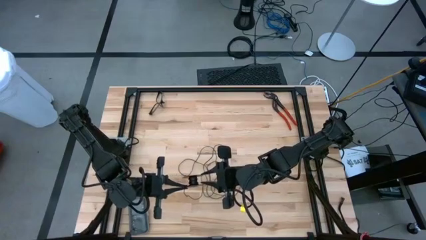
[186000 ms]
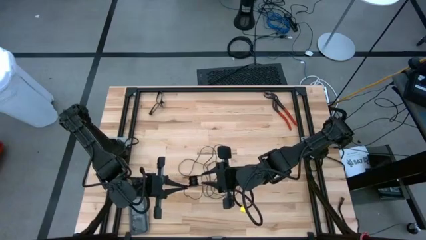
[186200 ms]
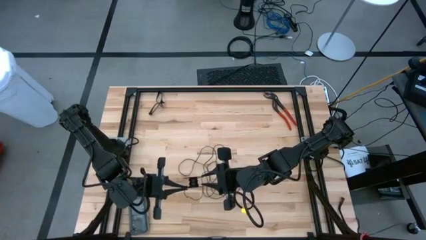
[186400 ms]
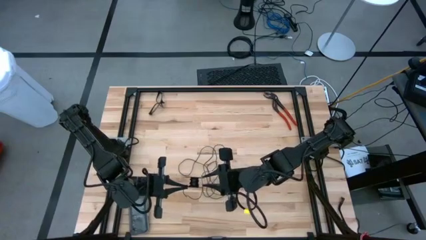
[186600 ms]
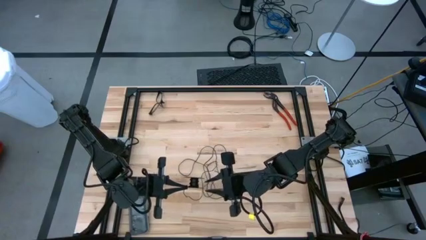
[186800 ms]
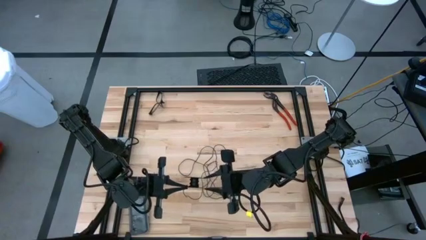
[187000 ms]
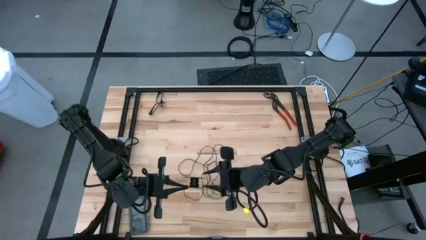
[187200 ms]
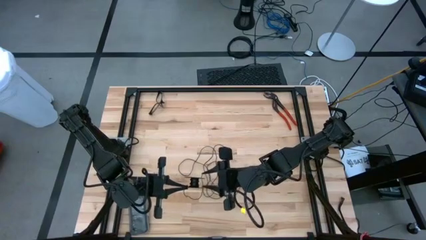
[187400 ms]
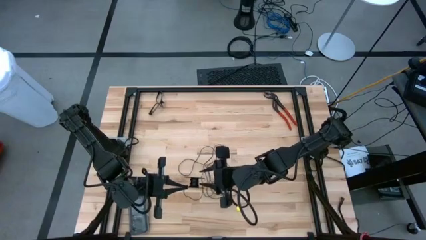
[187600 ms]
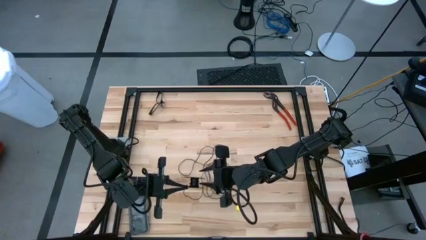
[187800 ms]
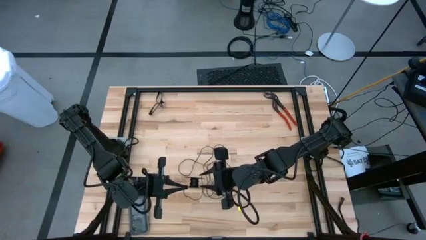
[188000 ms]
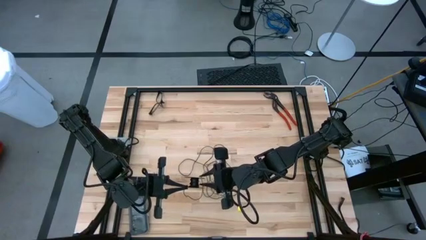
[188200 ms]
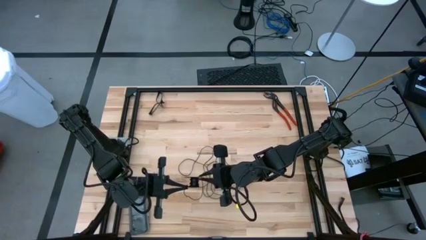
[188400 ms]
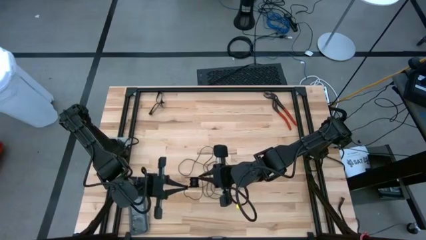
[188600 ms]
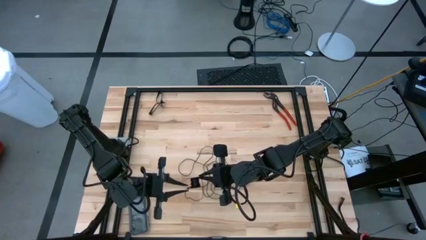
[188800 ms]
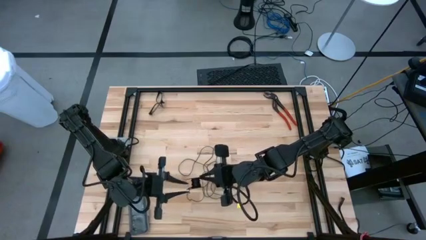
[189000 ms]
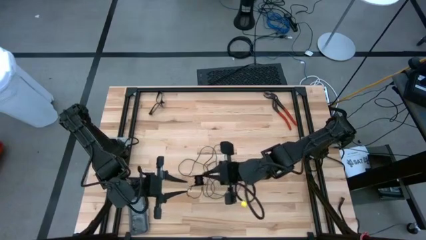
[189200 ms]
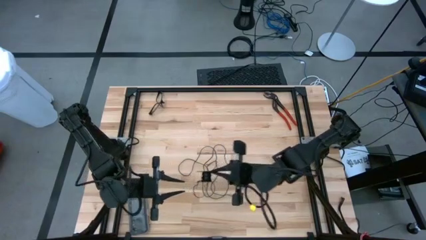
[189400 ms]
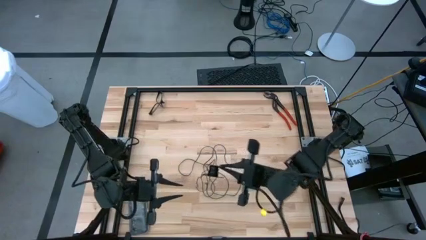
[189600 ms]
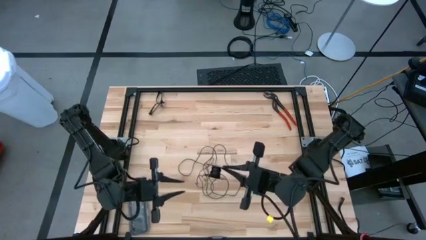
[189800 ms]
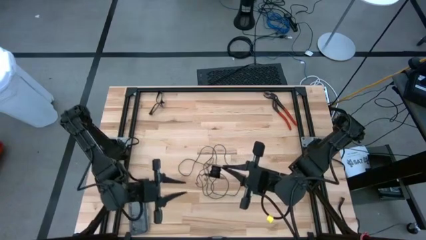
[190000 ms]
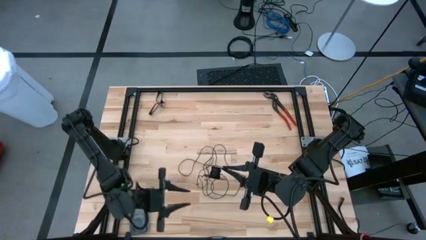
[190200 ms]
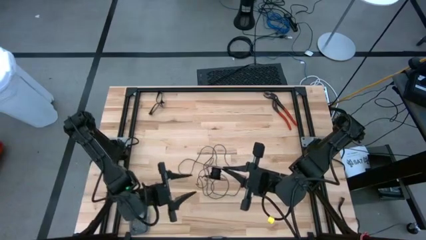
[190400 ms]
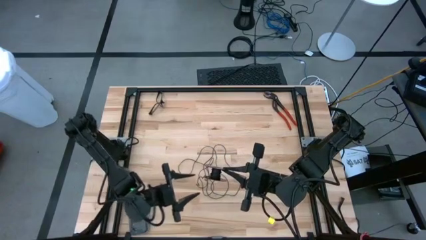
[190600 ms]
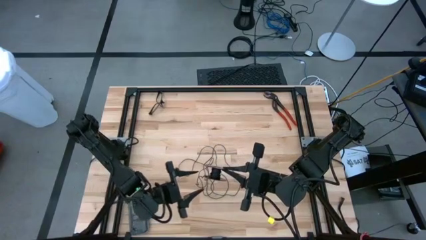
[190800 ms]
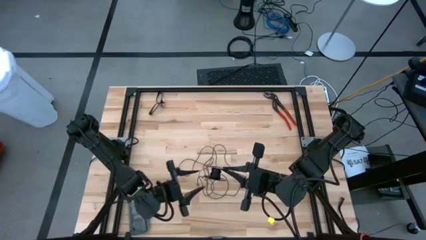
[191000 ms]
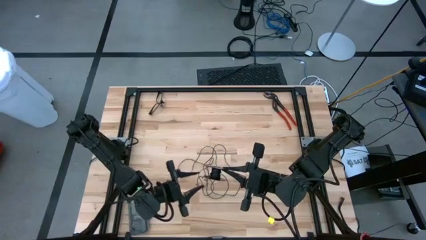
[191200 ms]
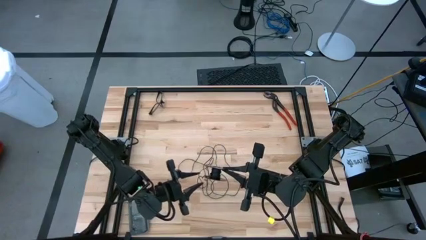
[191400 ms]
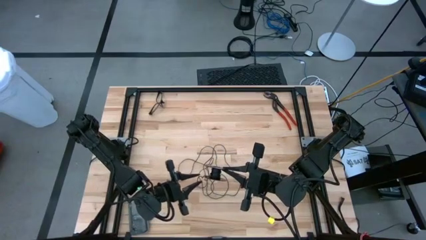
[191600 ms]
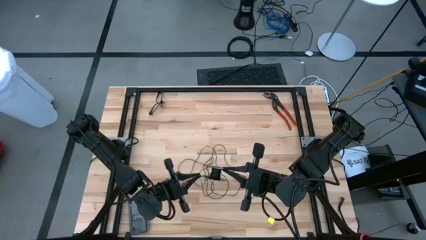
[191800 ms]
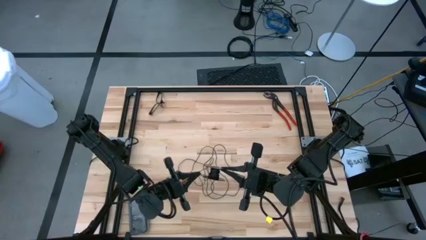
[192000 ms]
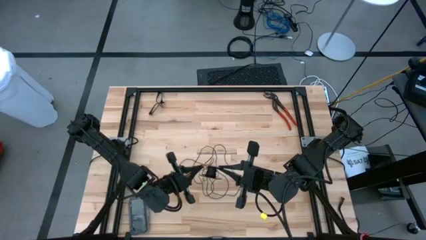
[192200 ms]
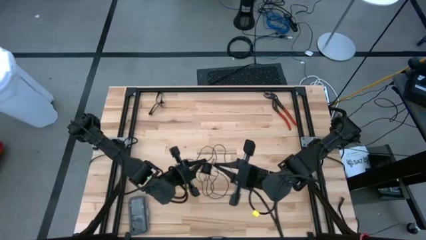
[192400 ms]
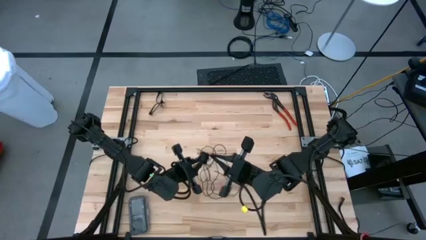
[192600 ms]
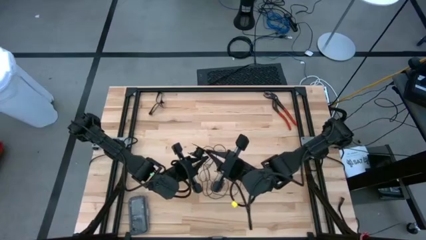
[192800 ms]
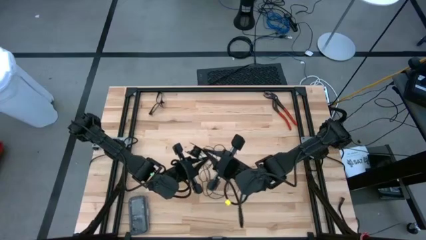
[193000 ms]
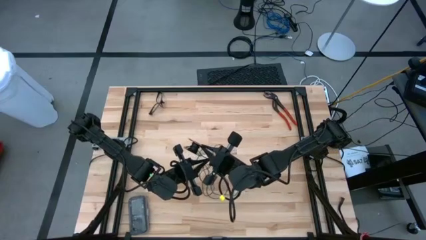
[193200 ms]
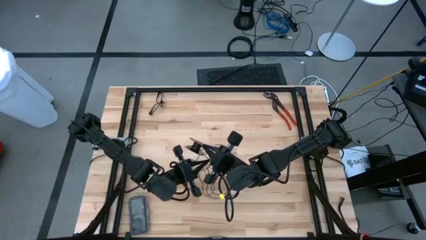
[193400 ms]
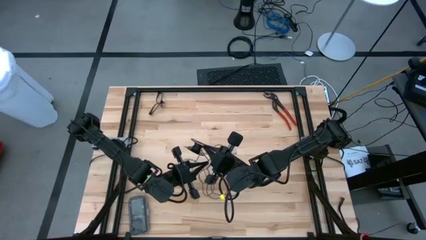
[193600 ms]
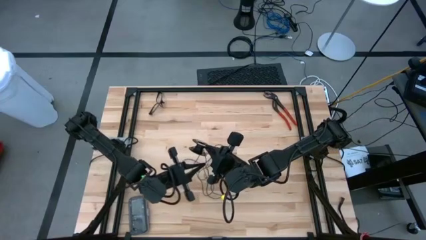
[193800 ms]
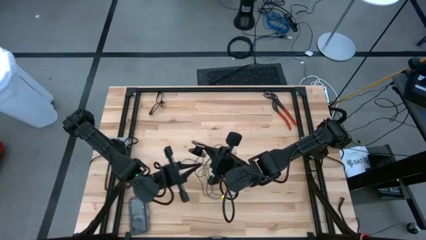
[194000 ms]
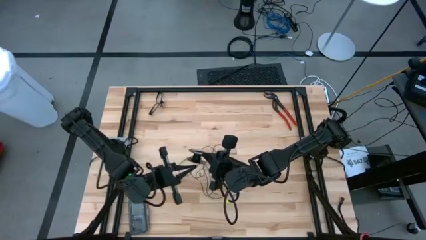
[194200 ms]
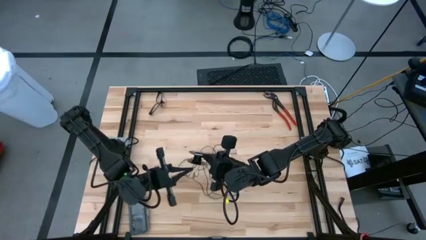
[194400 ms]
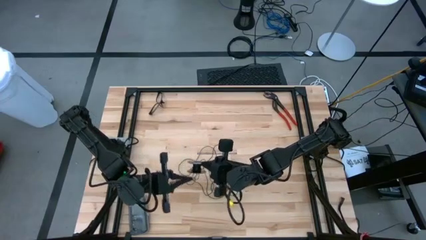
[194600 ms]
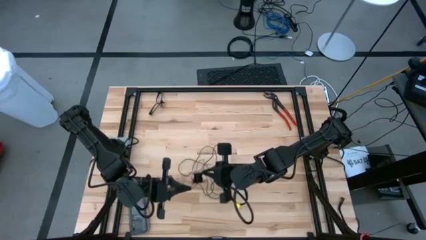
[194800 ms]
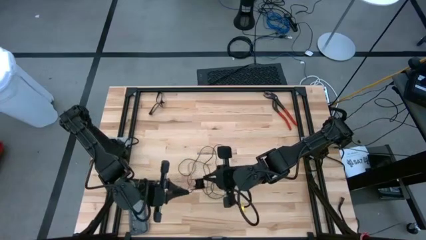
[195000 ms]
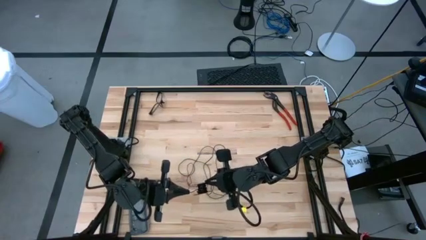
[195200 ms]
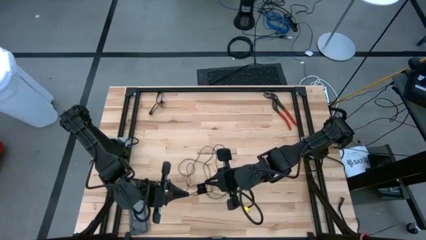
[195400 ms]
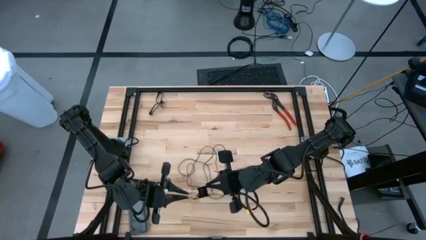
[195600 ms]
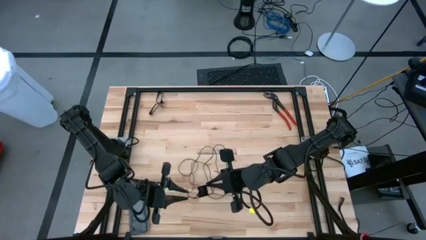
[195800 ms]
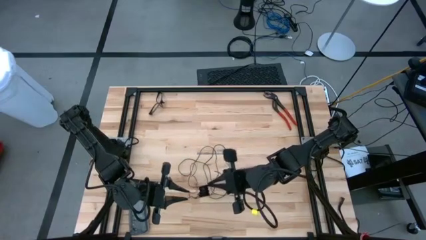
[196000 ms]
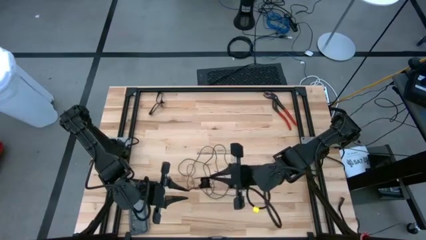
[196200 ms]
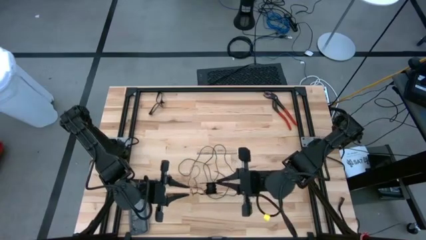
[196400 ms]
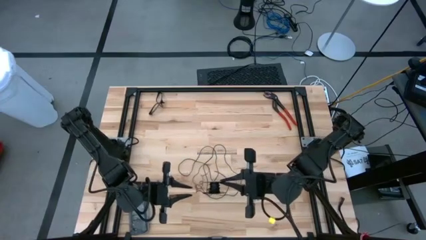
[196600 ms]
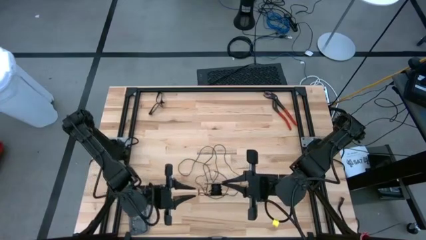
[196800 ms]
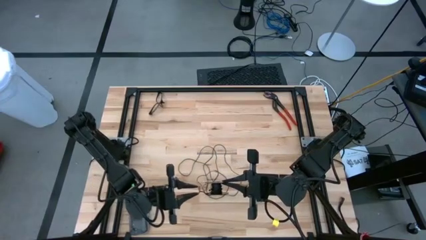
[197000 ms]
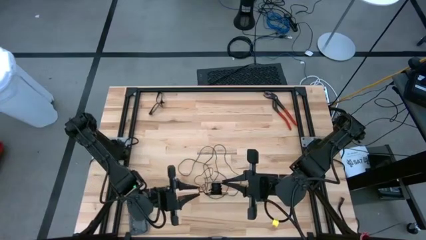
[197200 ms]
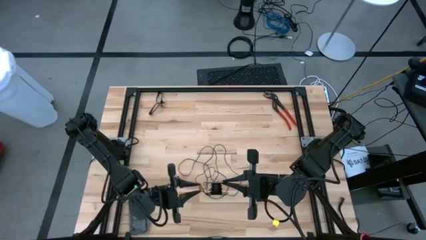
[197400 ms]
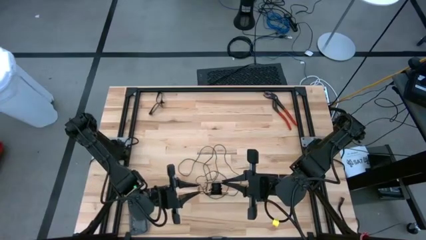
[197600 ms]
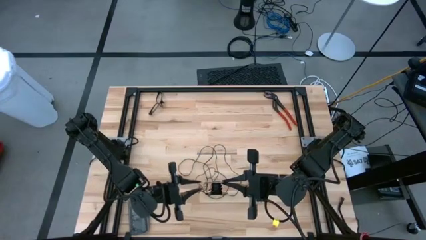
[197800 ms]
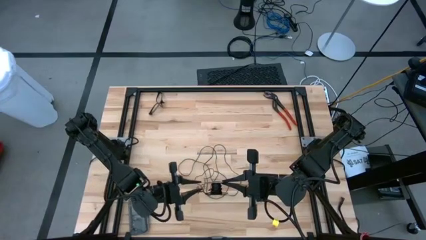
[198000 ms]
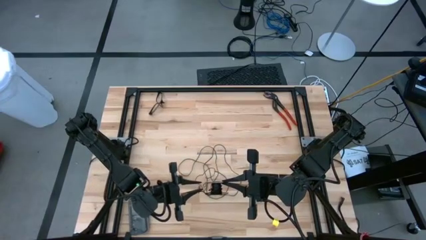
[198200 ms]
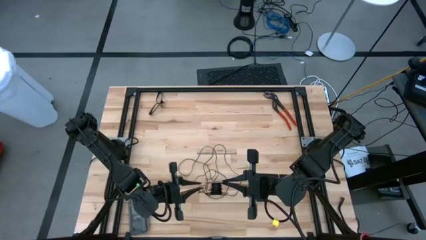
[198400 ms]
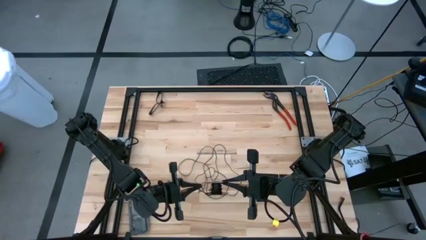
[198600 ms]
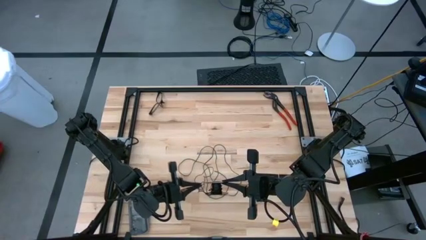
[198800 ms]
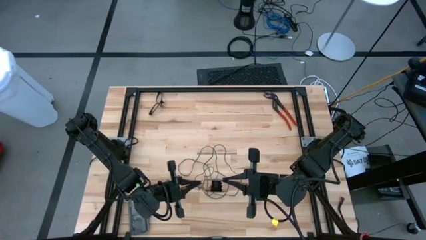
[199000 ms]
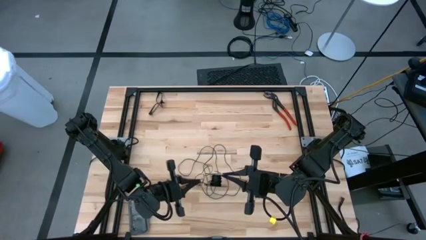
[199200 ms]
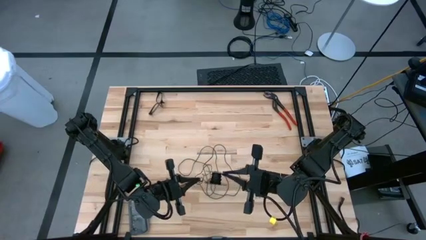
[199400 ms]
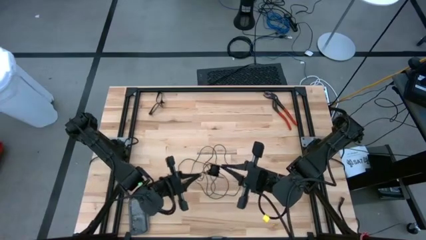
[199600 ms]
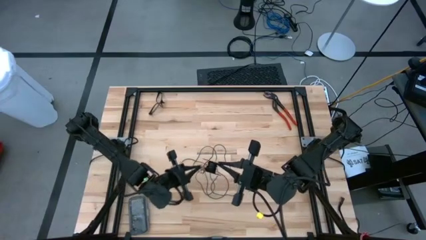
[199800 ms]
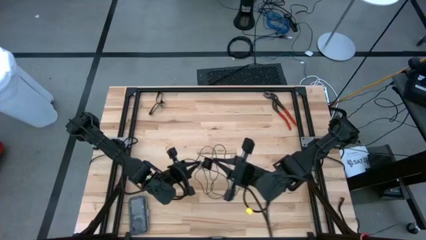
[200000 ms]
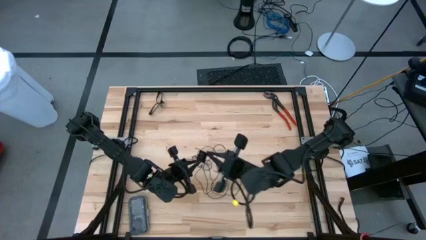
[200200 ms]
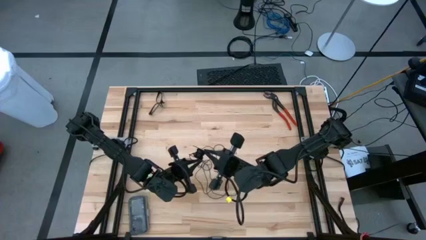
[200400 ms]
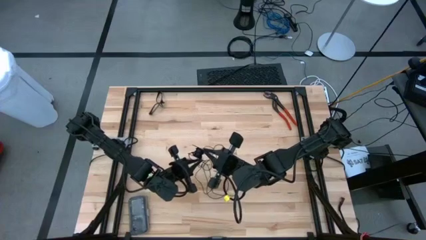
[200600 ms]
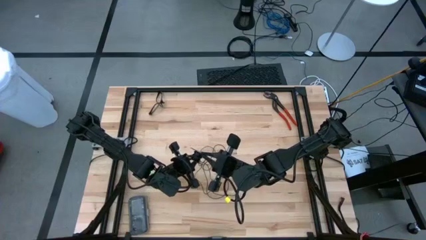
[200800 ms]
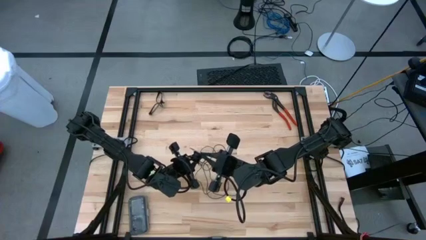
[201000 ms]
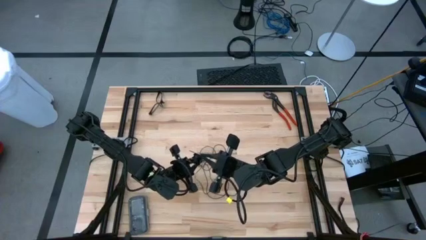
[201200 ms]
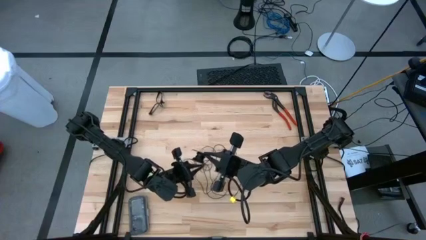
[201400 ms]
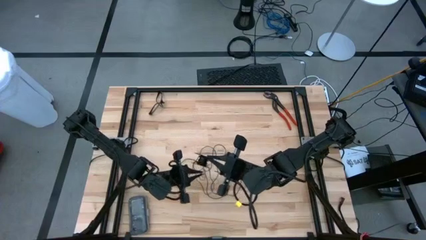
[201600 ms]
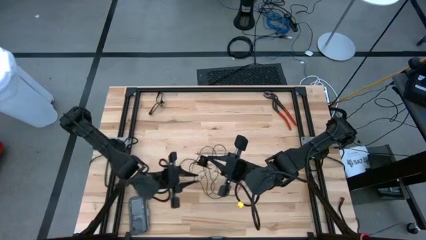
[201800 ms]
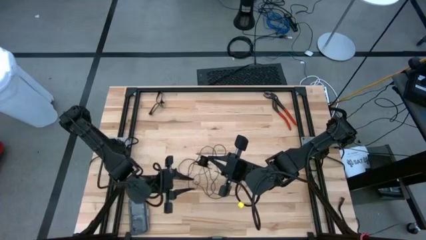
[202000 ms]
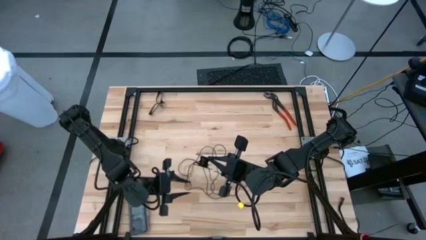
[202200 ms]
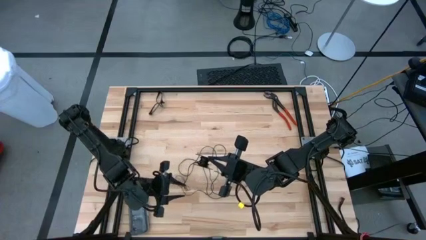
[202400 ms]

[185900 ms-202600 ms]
Task: Coil cords
Coil the black wire onto the spool
